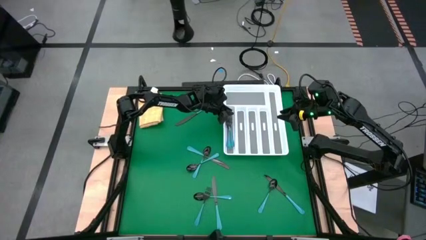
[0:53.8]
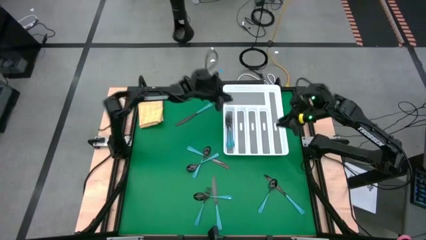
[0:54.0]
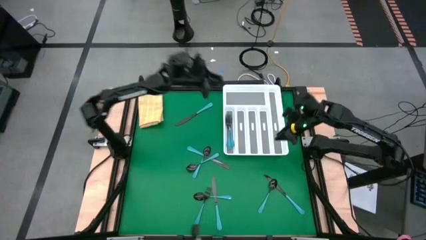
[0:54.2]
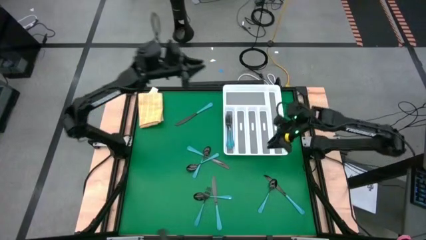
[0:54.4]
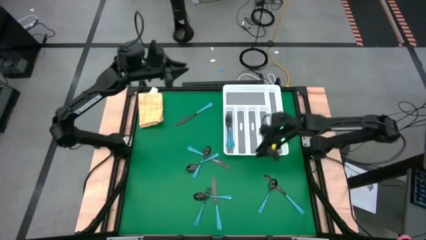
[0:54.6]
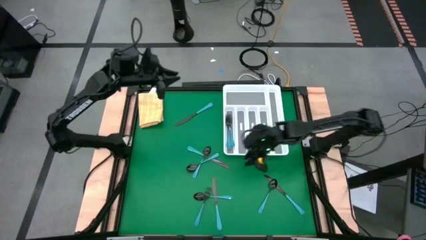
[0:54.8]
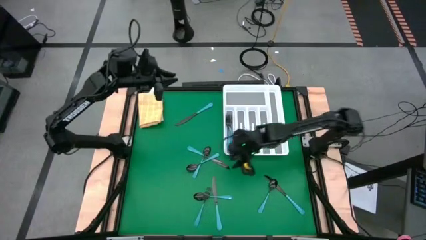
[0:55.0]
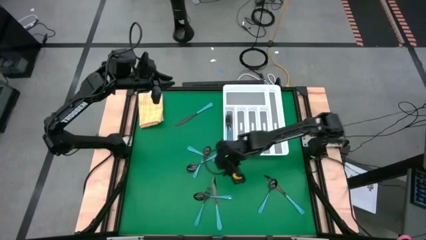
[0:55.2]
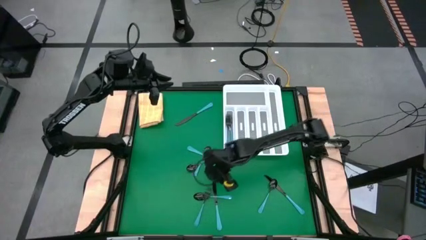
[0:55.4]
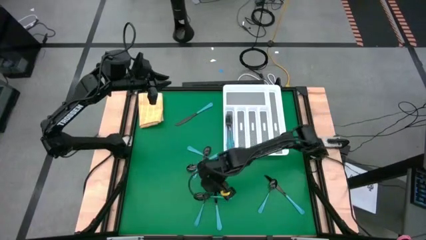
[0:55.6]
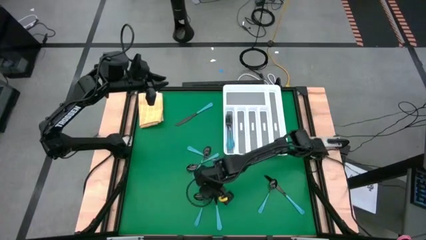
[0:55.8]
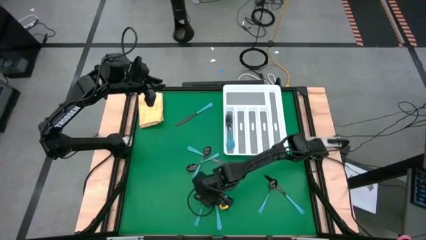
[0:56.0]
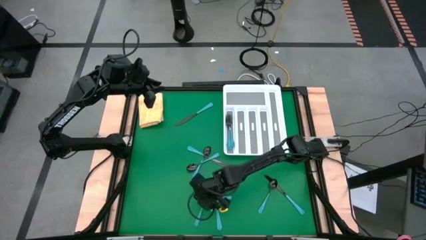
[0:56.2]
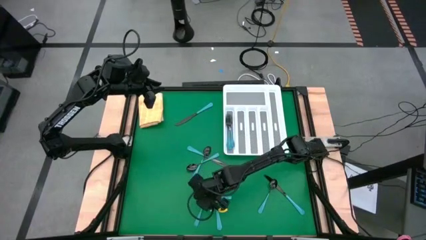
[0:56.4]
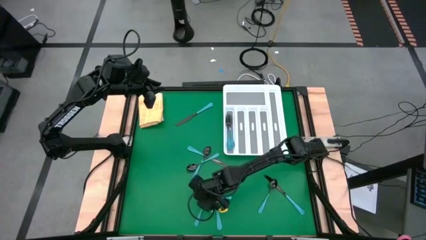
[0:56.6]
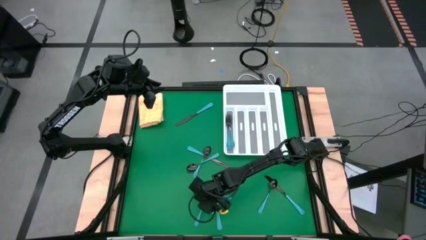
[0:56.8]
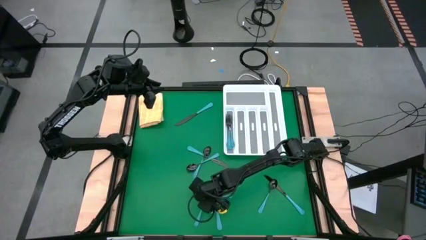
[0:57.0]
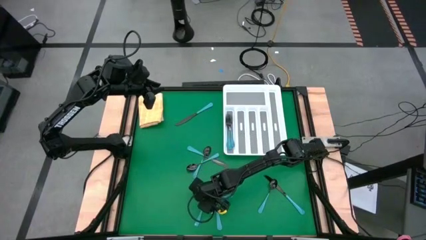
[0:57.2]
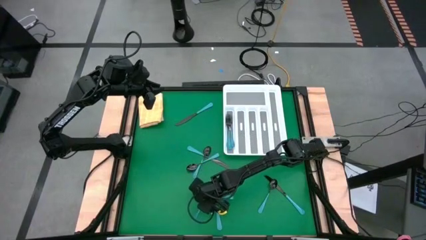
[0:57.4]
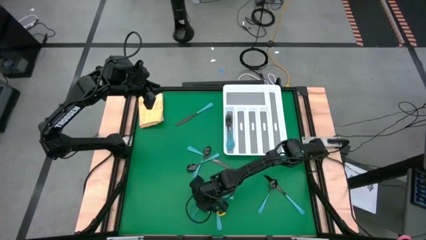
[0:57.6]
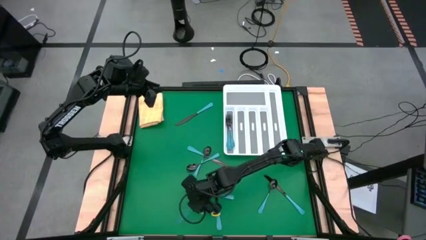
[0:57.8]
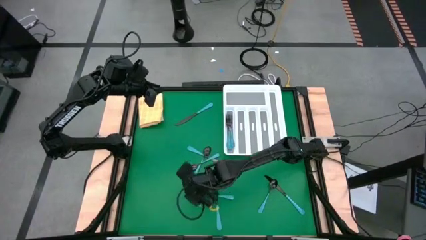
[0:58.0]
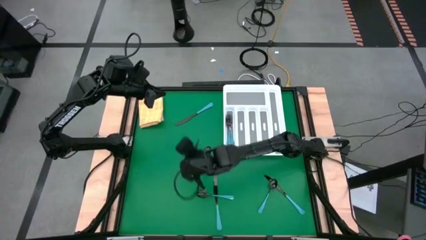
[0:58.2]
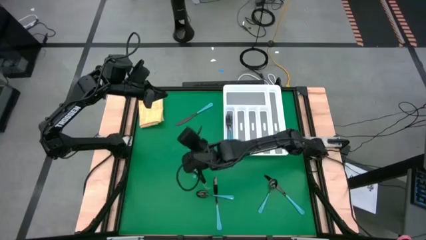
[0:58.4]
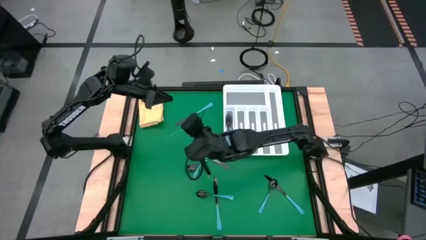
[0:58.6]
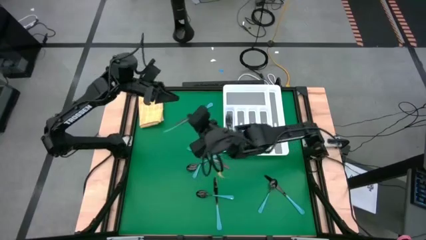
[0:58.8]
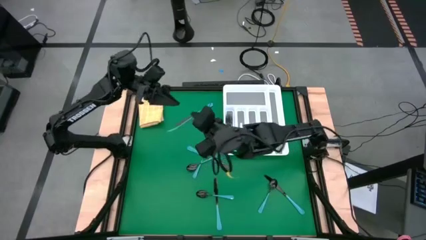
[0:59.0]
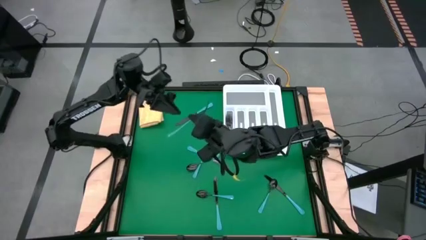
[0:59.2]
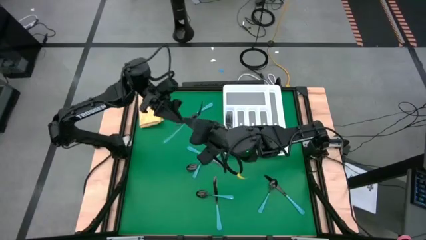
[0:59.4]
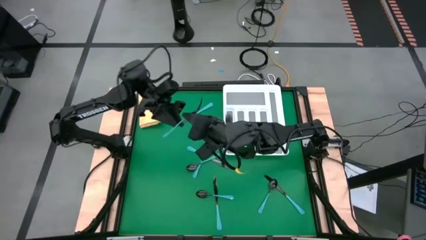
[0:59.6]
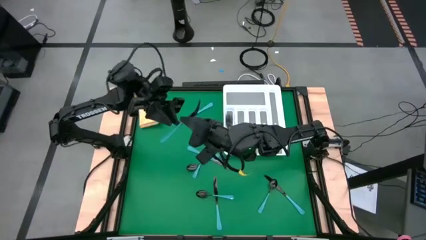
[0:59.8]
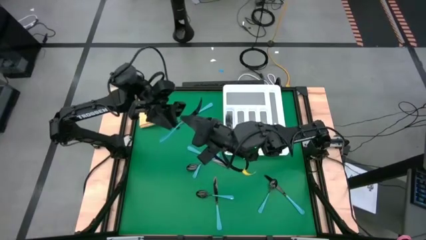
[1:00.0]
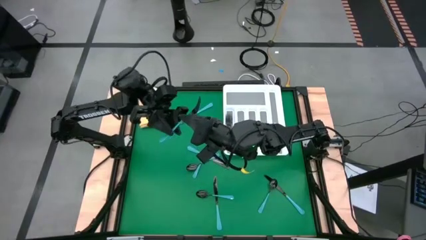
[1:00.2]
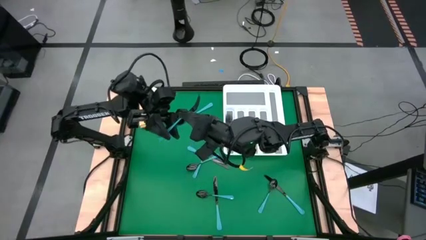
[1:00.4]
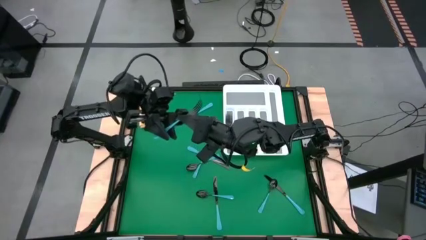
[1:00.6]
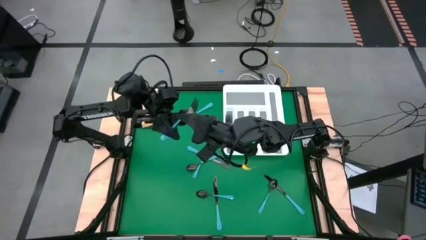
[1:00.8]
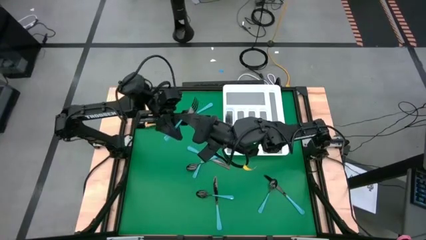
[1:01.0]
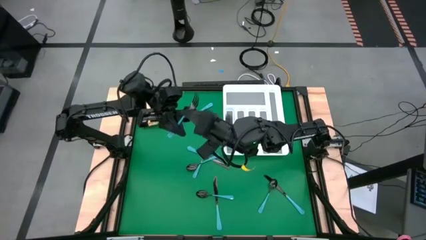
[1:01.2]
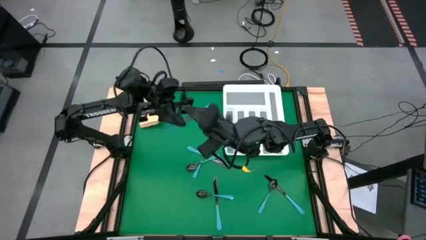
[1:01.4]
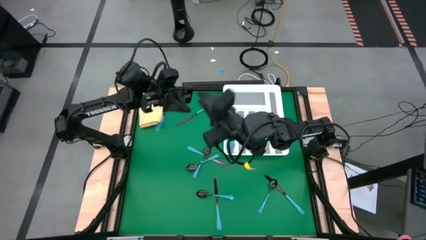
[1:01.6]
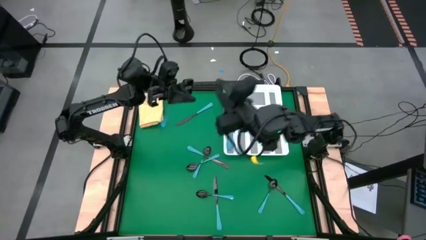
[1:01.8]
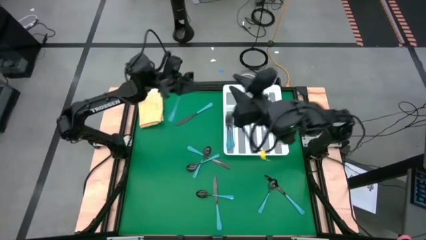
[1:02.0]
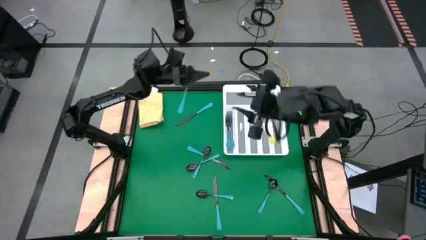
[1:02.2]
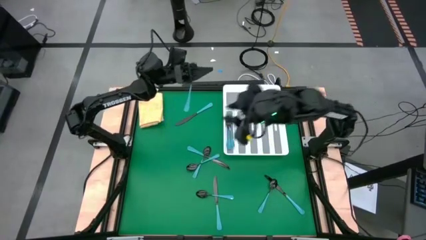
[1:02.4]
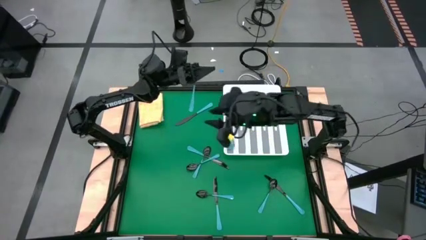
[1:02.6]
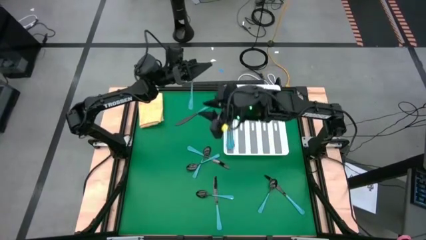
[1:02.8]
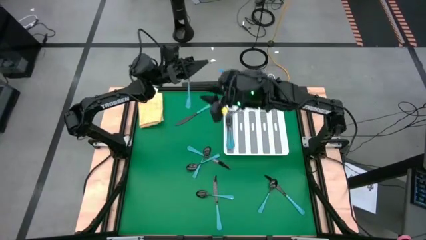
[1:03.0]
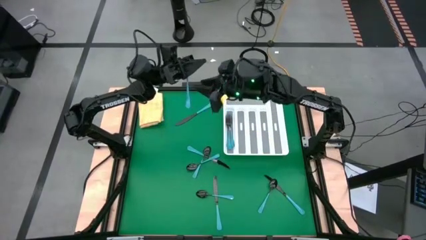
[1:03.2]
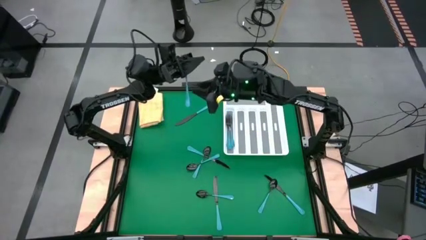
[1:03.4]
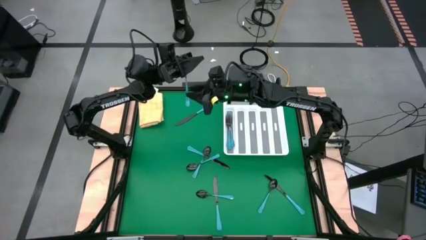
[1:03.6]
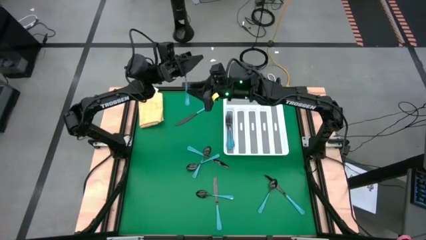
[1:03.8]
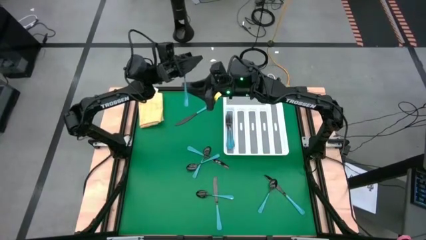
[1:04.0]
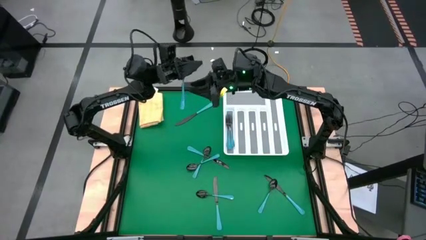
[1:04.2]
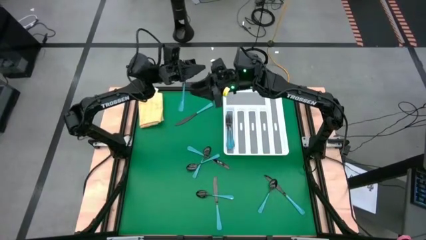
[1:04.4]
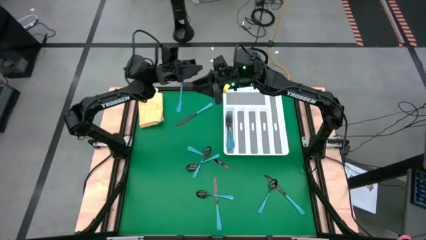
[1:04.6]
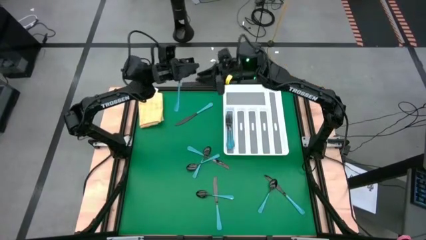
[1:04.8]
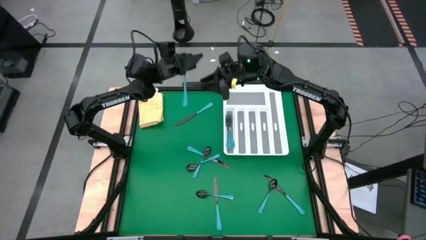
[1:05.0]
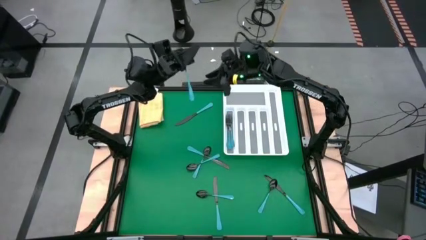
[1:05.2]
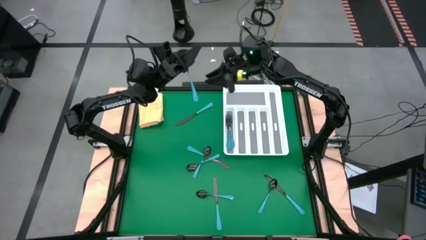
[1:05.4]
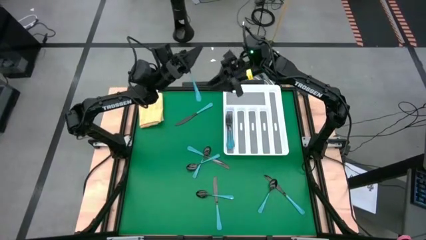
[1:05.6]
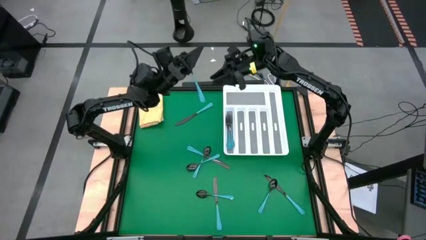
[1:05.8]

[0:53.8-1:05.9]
Task: Sort silverware
Put the blue fork into the silverware organizer

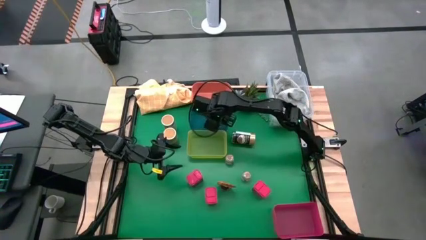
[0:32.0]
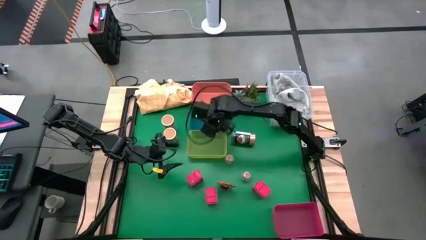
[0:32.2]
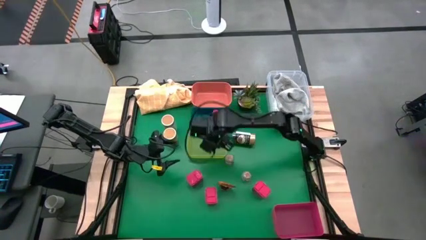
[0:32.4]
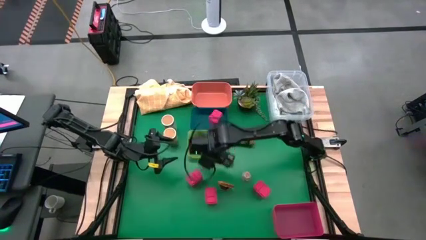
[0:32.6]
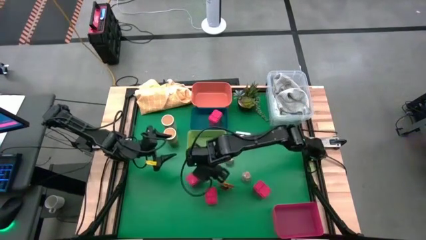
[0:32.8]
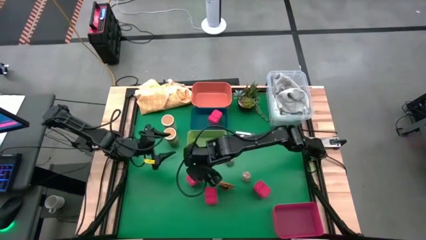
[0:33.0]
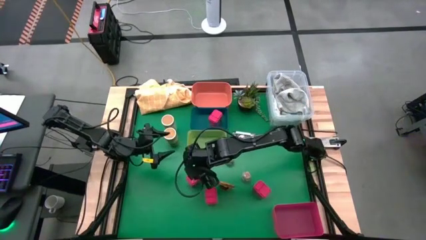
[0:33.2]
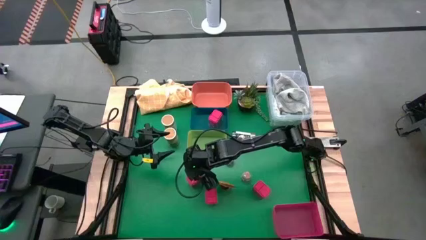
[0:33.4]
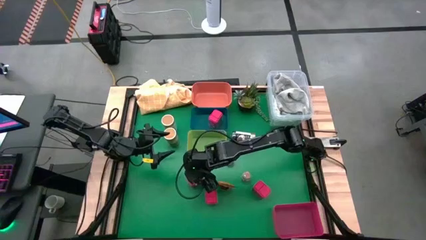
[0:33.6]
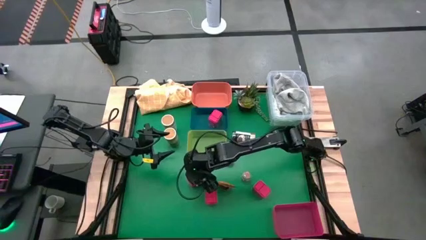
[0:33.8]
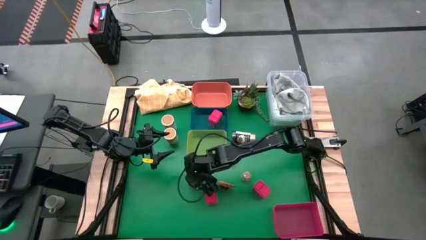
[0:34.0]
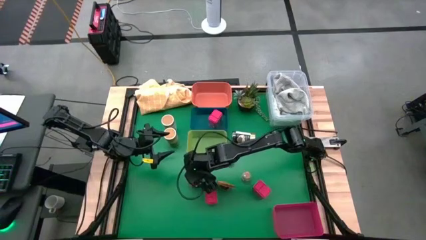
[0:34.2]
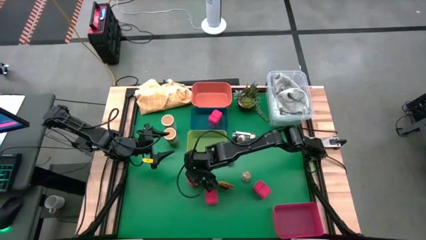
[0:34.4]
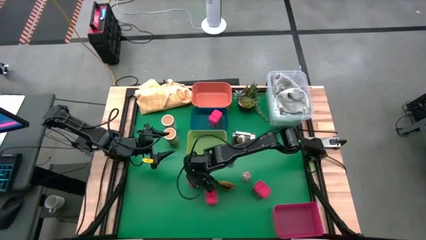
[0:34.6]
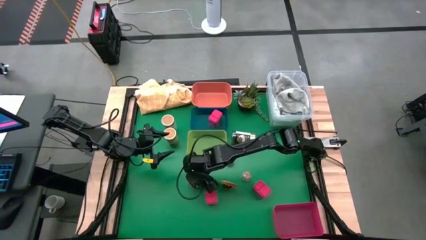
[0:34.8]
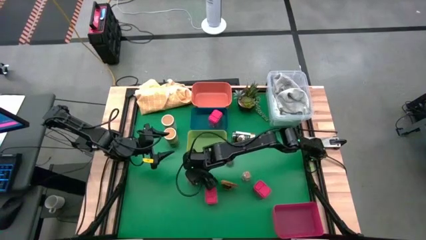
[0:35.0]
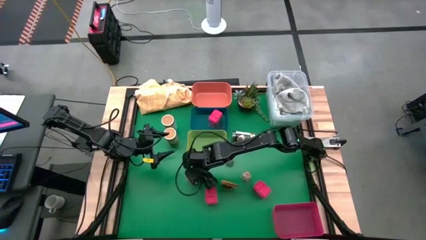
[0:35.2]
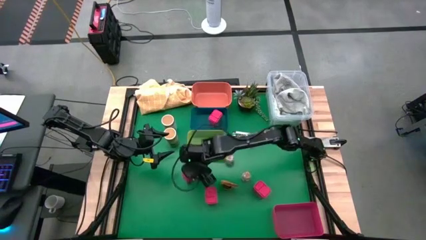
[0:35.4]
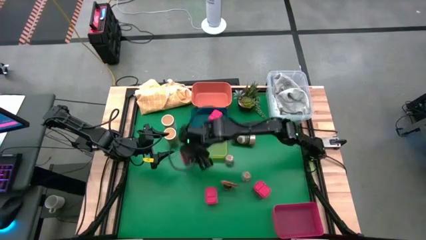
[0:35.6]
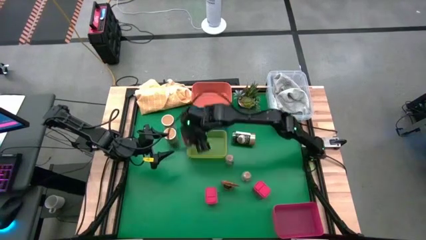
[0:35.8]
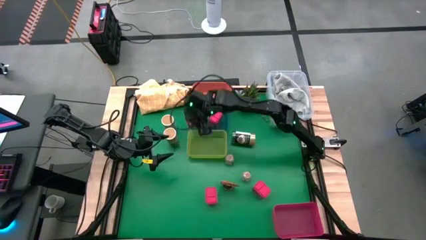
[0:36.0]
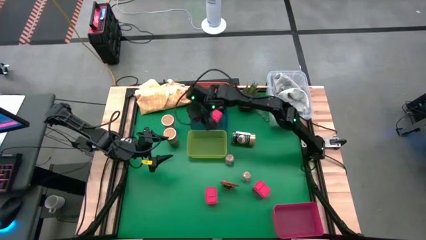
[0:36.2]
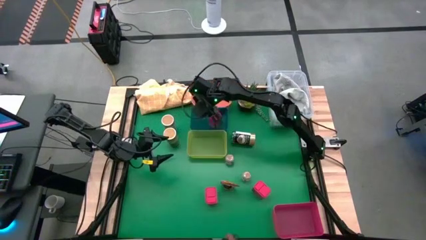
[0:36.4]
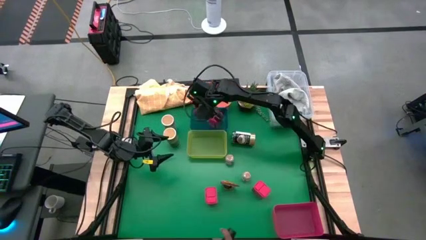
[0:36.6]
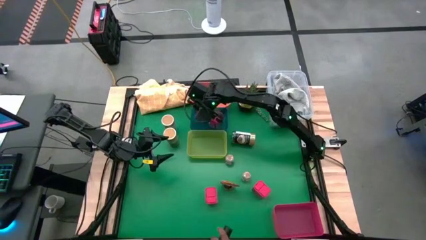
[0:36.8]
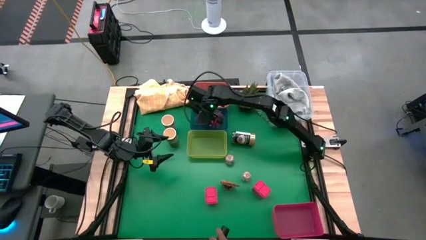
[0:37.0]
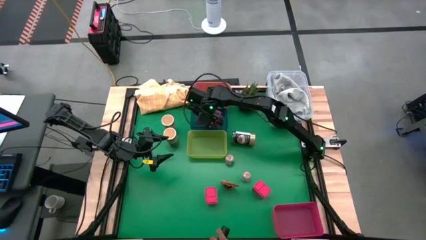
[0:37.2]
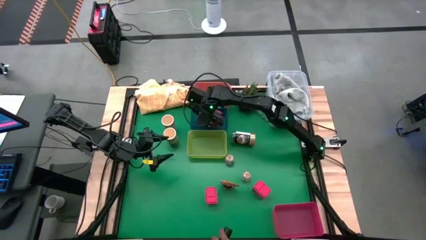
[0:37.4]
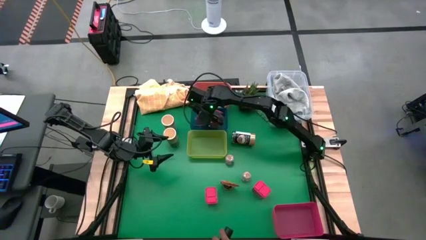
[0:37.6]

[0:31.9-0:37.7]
Task: Sort spices by type
Put the red seasoning can into the blue bin
